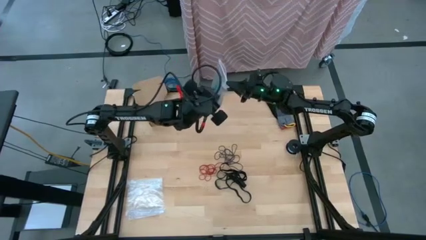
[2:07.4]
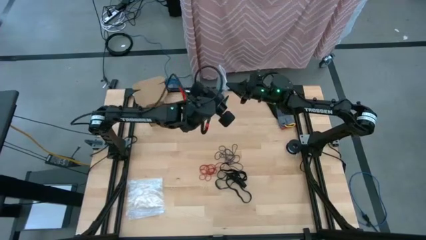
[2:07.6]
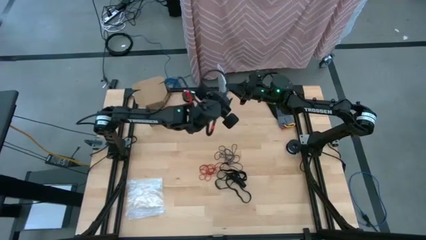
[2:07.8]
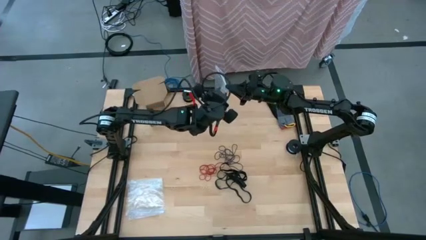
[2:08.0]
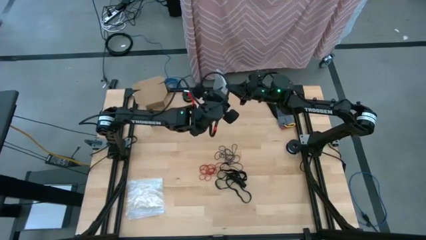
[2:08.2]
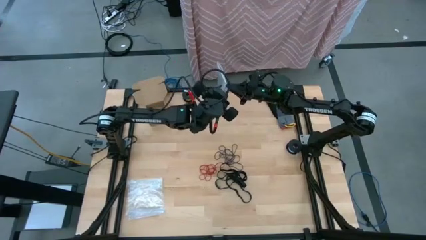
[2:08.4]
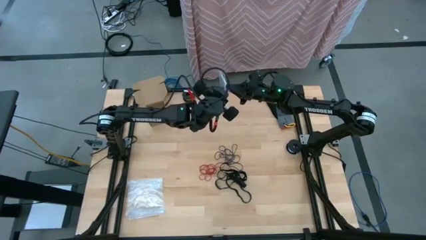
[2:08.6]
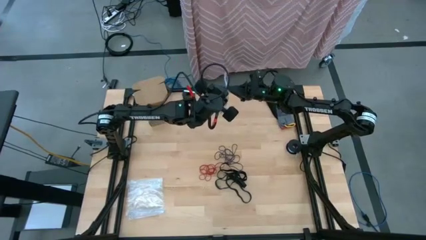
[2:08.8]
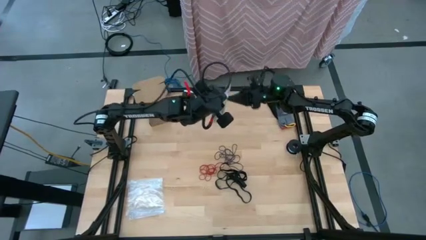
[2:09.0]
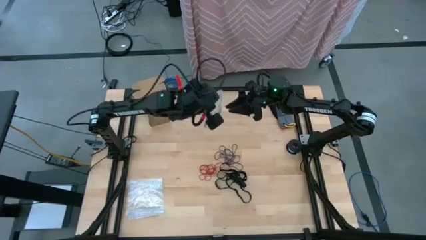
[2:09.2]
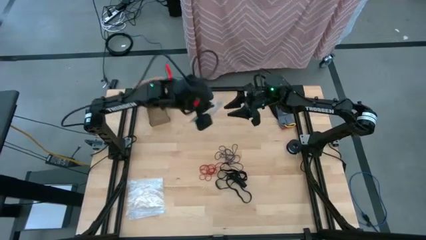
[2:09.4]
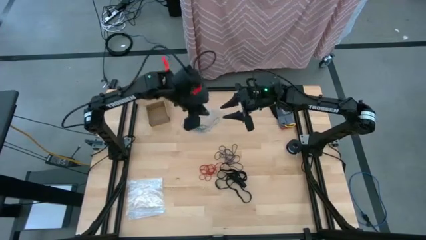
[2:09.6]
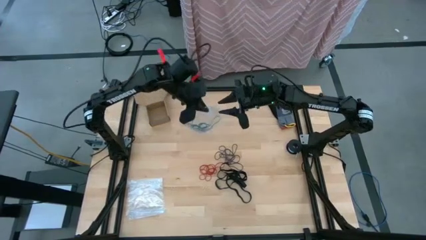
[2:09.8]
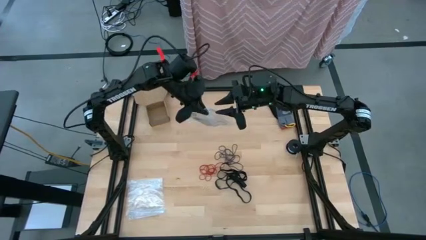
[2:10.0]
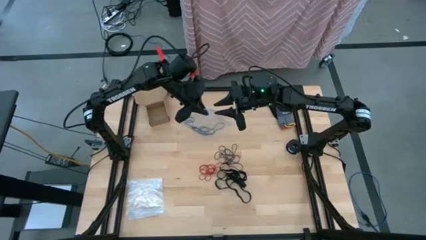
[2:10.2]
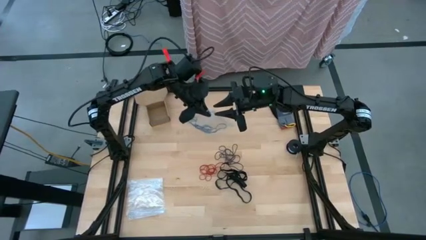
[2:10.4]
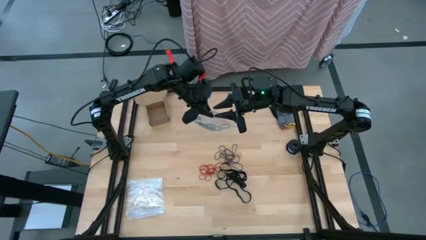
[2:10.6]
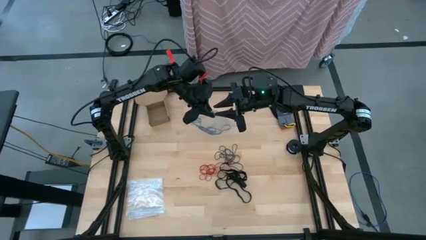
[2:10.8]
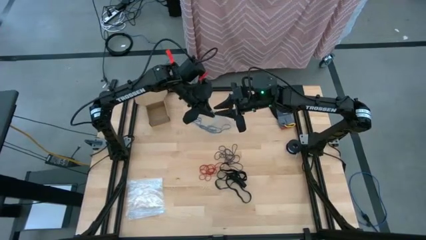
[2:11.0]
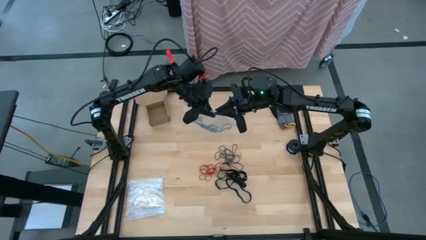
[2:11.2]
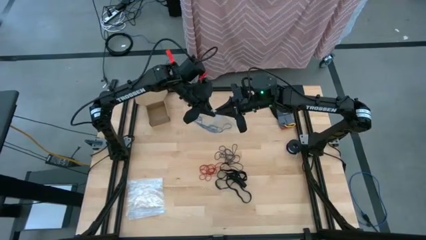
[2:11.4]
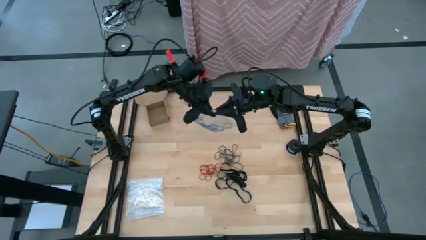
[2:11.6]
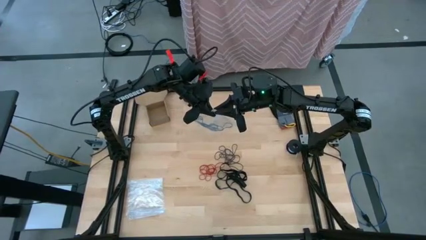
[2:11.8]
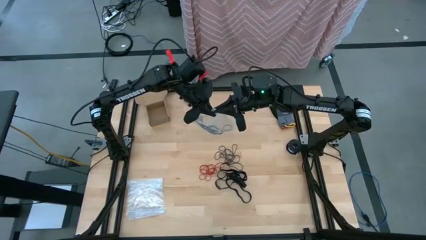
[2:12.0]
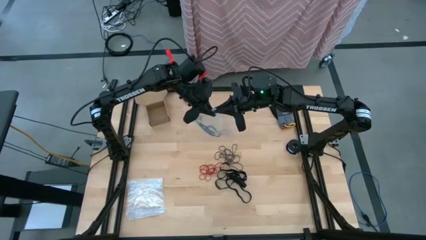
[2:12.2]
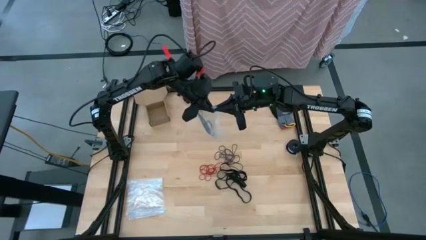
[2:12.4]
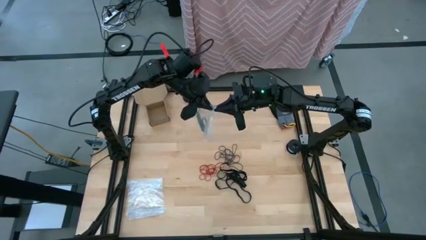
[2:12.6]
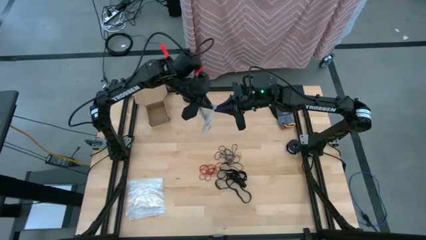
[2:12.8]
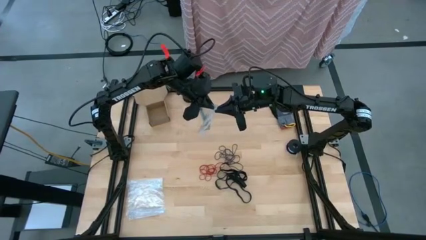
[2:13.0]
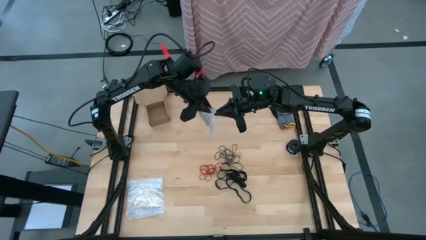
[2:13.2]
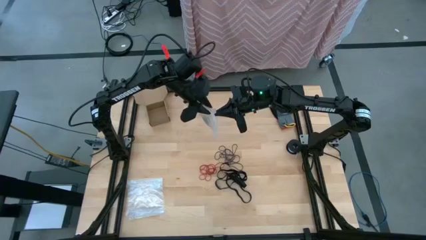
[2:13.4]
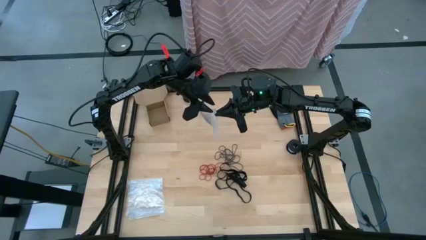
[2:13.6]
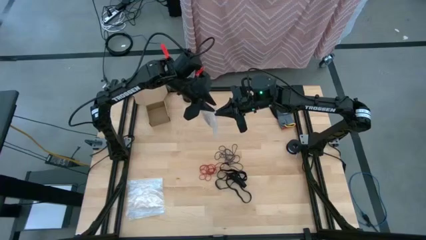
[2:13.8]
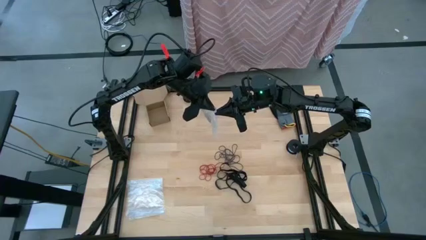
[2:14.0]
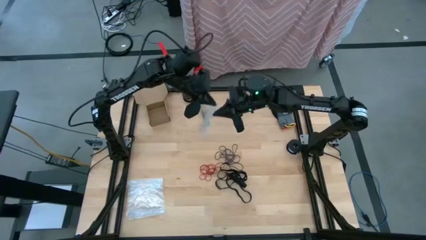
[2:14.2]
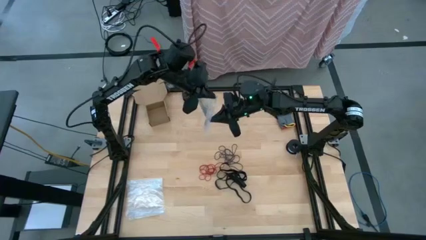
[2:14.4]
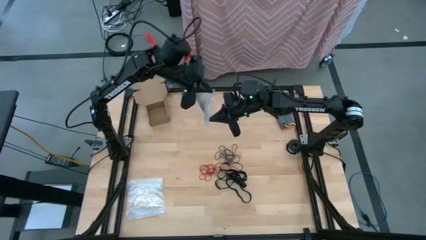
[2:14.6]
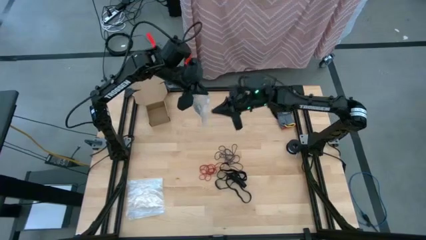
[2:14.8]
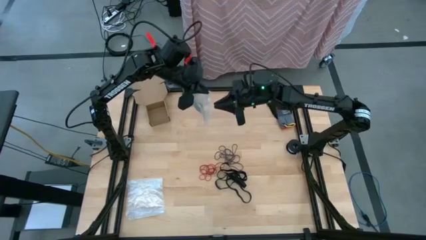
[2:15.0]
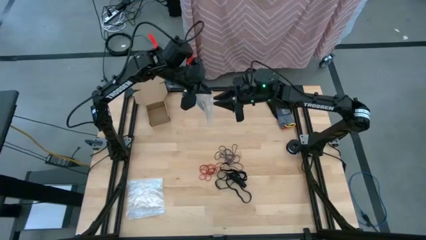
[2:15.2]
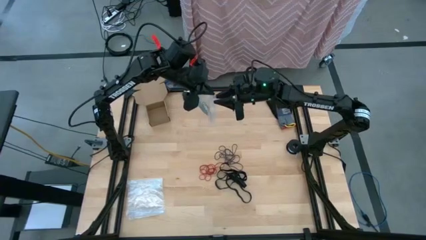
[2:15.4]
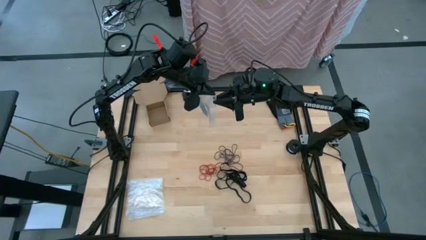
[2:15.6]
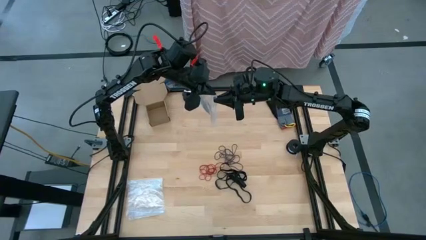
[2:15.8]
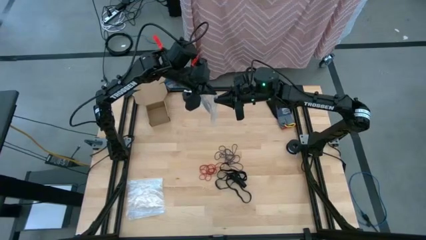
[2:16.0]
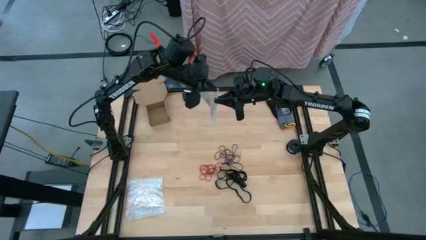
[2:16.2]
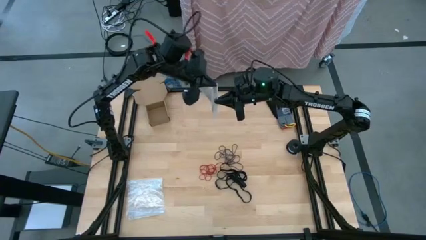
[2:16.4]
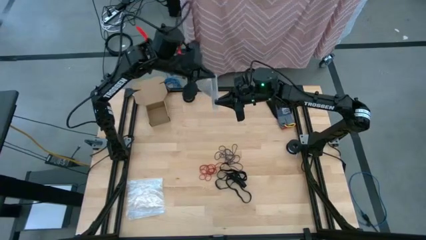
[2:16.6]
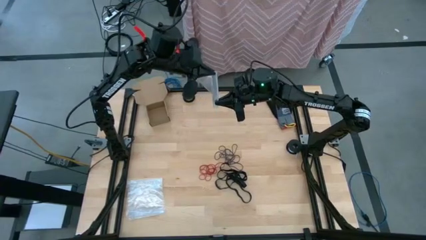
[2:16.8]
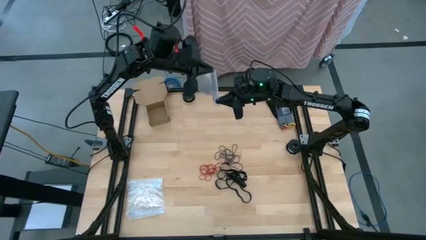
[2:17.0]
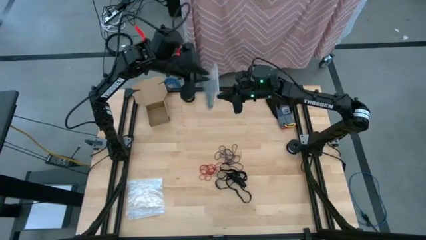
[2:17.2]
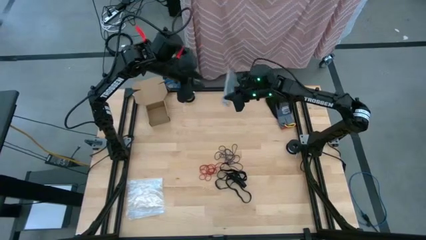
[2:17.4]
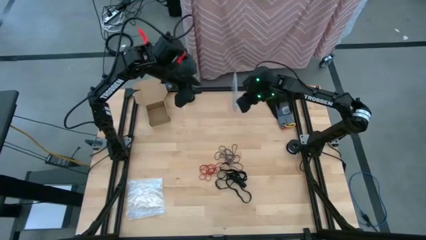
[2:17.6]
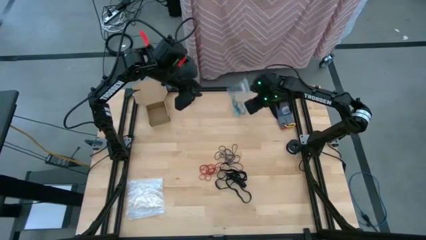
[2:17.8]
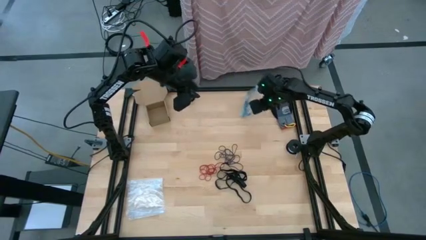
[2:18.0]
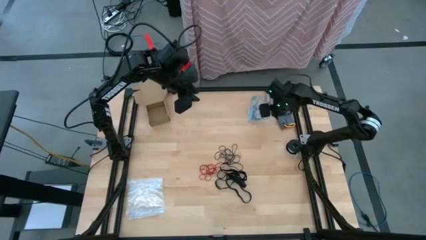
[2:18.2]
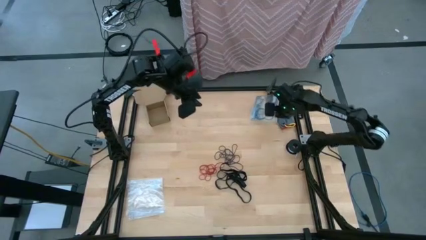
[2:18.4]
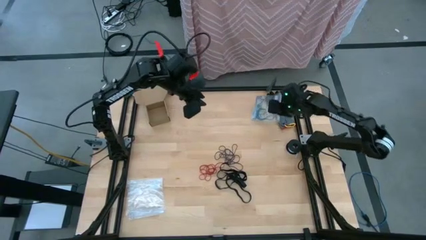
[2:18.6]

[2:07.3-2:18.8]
Task: Sort rubber bands
Close the transparent zip bag

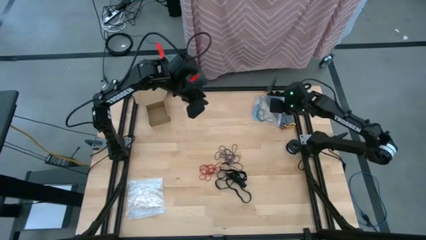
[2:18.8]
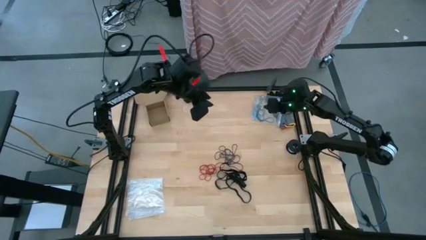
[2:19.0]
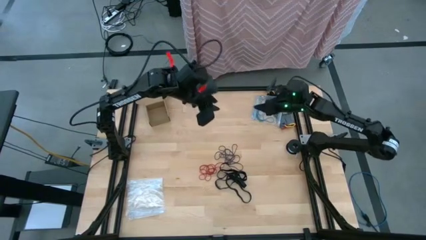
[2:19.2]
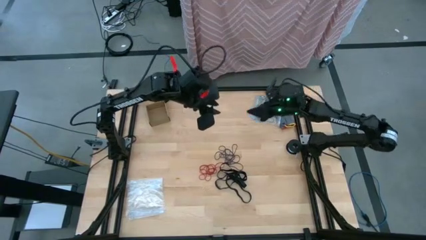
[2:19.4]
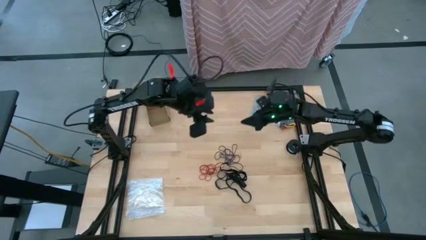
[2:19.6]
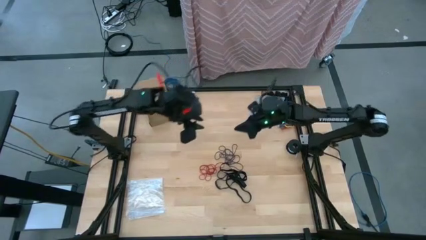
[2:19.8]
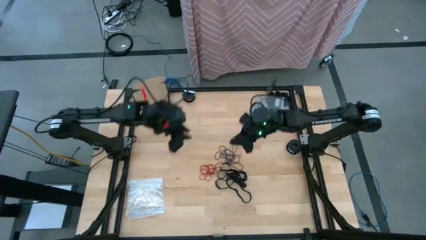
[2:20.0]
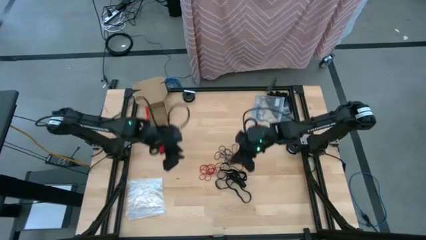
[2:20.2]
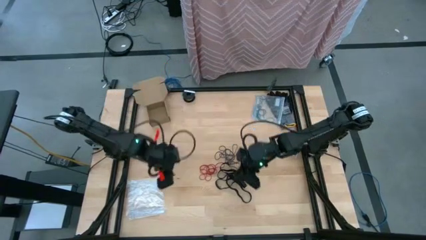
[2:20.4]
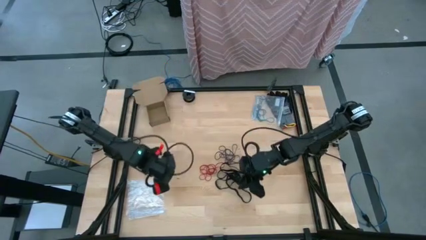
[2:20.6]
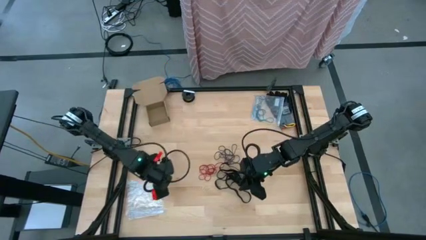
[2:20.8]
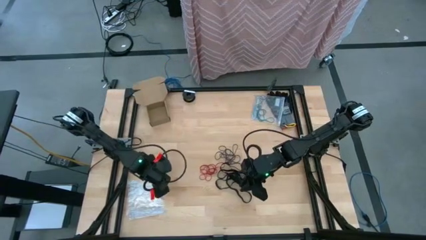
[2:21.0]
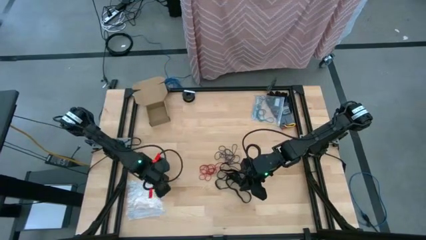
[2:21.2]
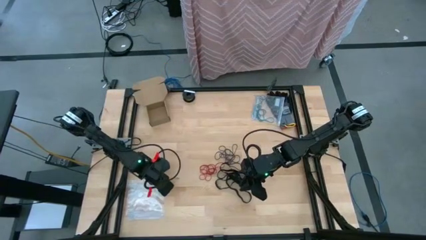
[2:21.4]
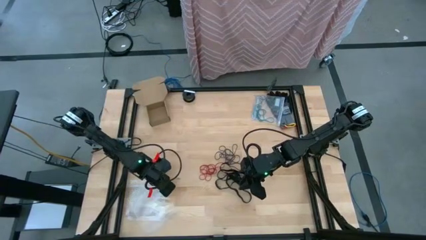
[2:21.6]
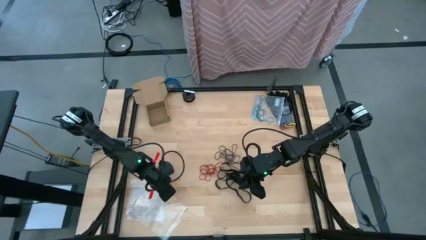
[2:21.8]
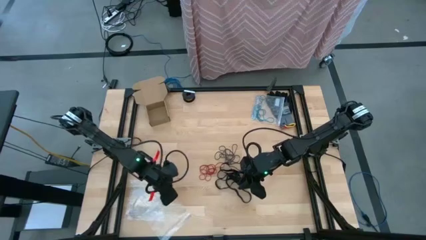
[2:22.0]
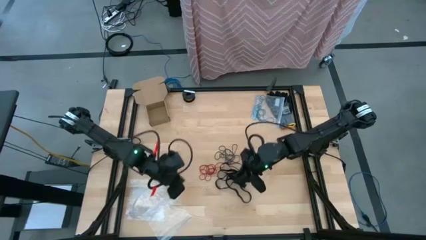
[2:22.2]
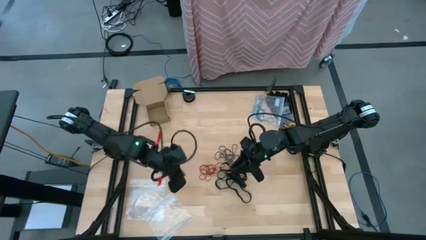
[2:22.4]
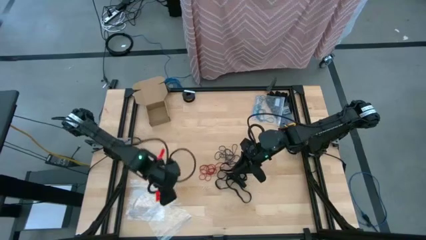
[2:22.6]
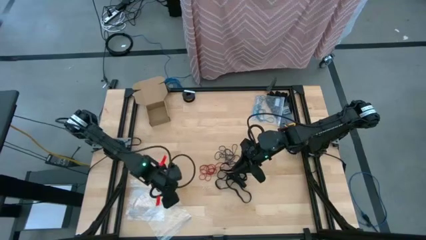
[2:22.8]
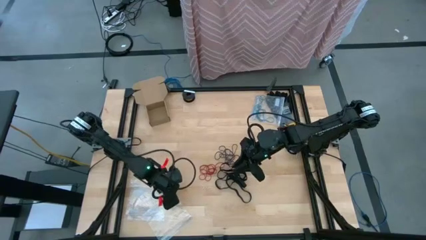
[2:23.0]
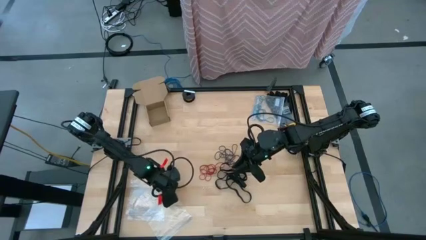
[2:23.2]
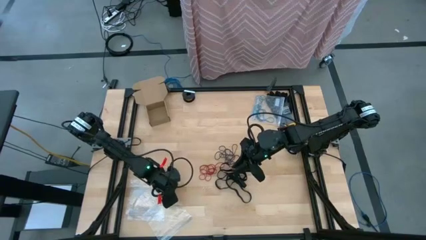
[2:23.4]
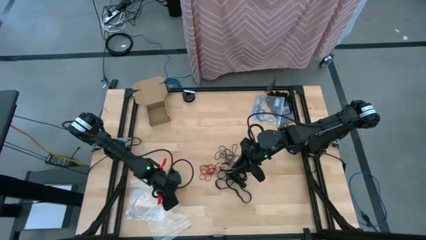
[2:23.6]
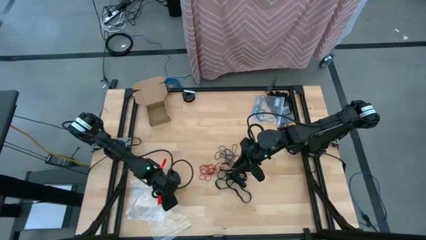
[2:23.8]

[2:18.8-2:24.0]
Open the transparent zip bag
